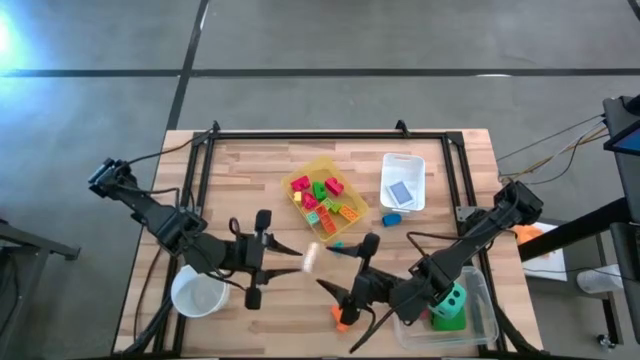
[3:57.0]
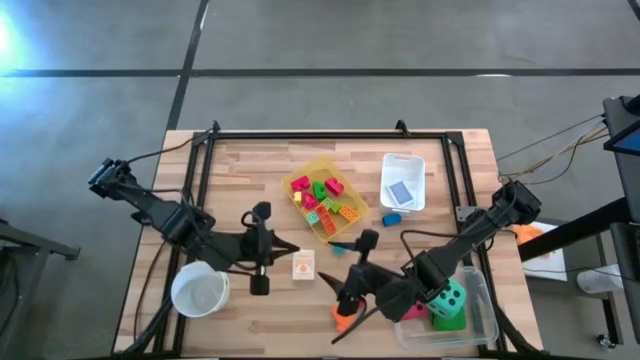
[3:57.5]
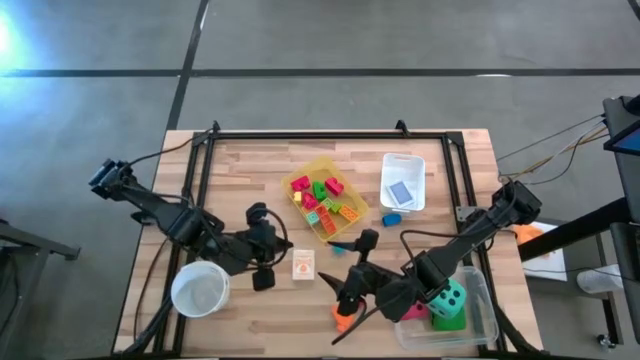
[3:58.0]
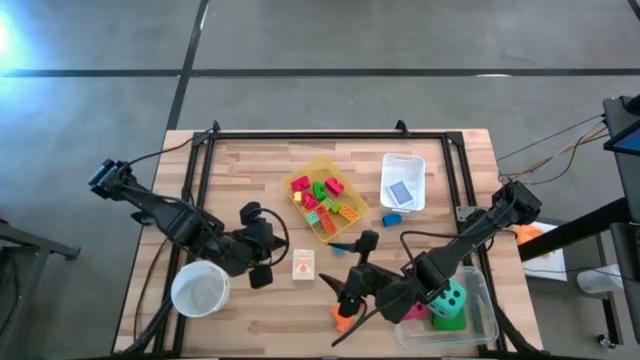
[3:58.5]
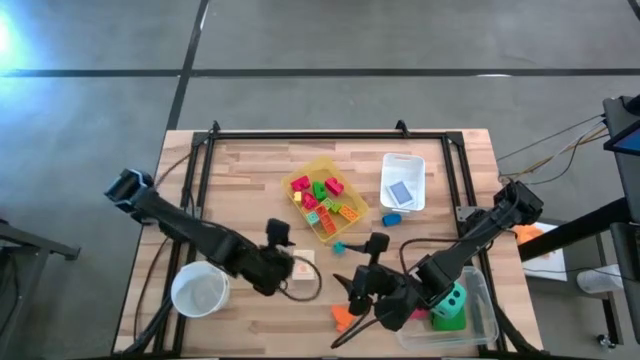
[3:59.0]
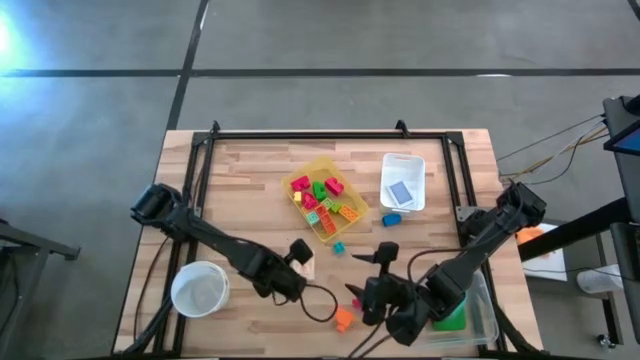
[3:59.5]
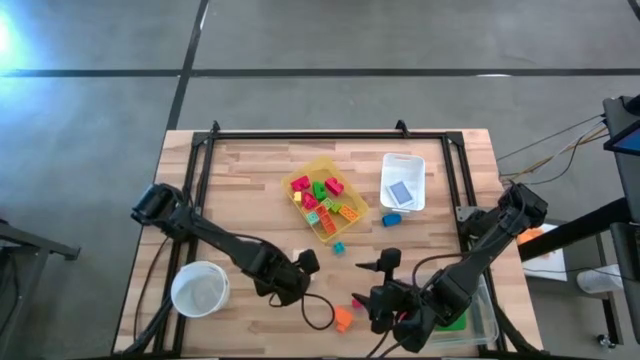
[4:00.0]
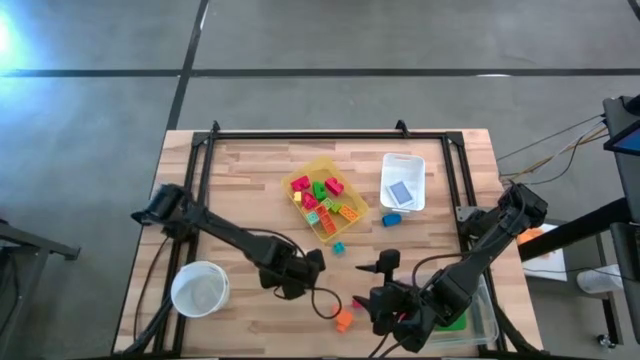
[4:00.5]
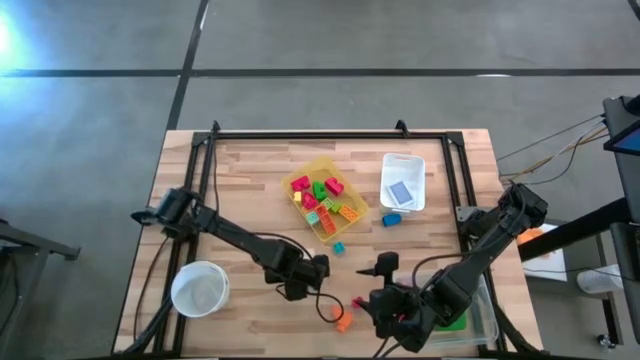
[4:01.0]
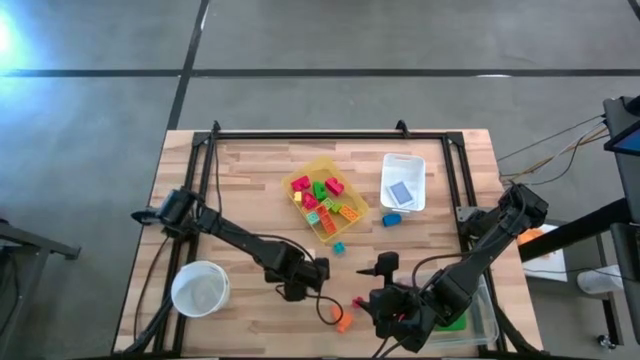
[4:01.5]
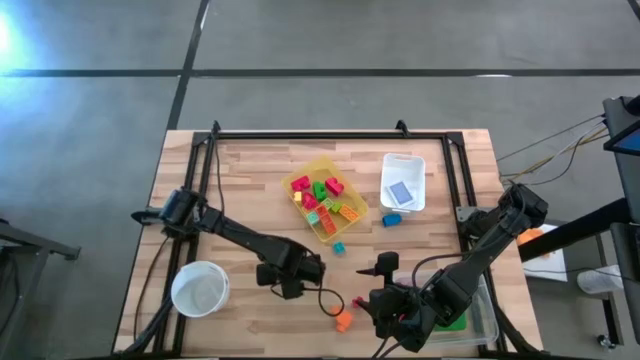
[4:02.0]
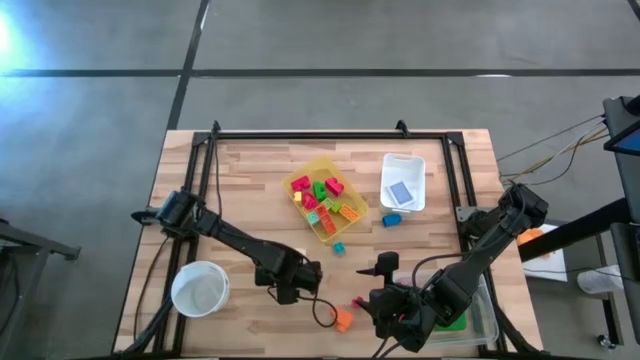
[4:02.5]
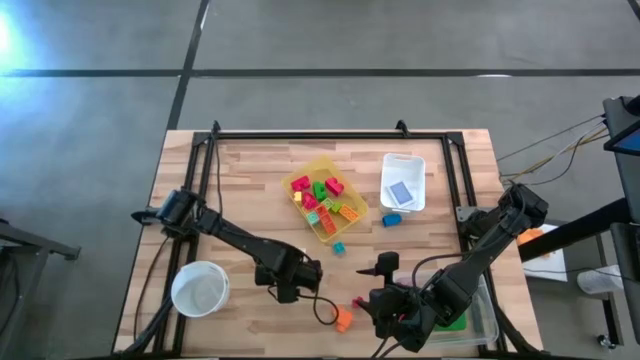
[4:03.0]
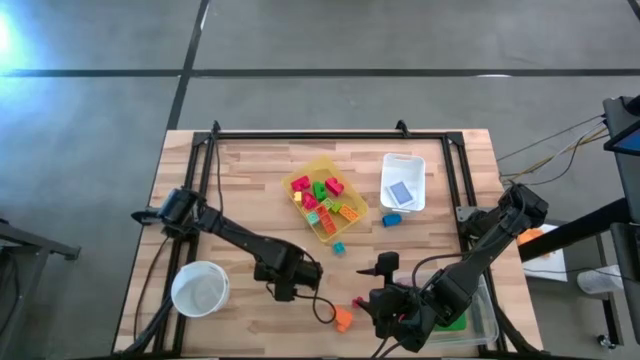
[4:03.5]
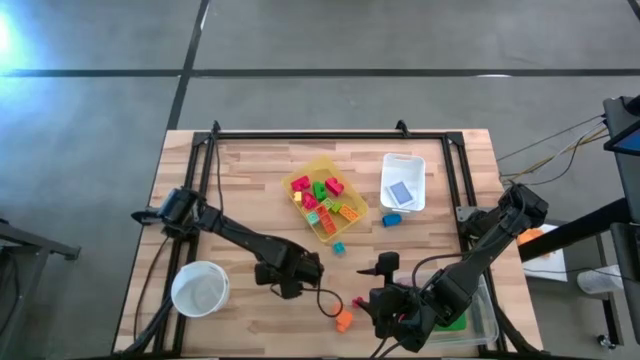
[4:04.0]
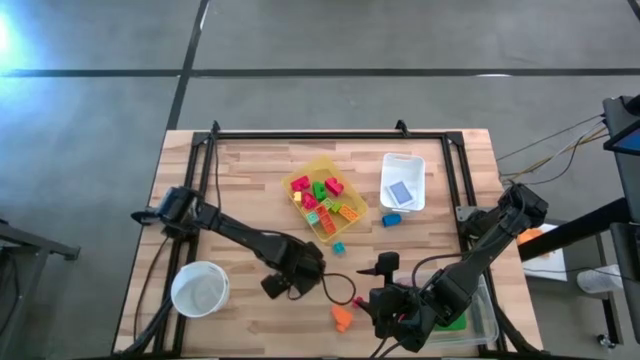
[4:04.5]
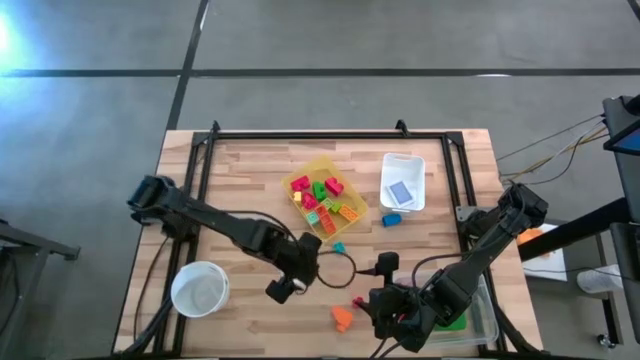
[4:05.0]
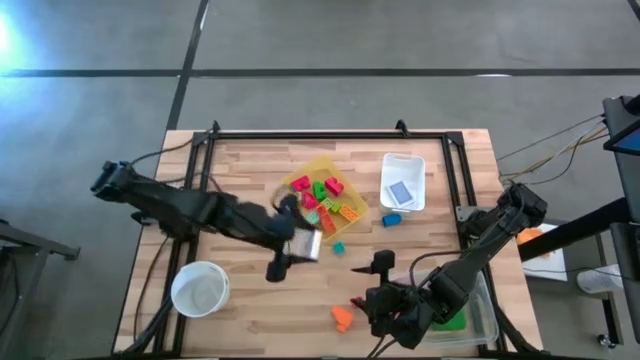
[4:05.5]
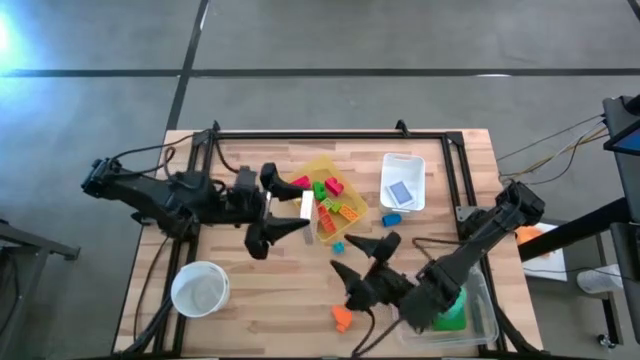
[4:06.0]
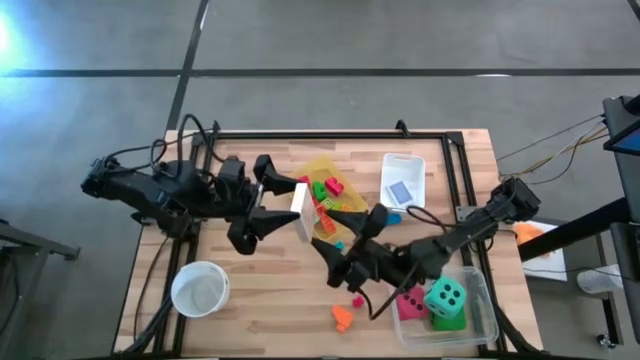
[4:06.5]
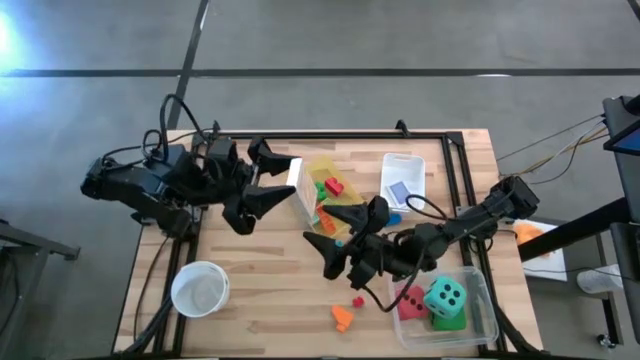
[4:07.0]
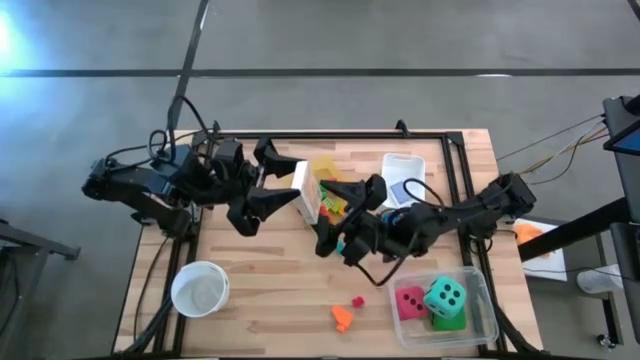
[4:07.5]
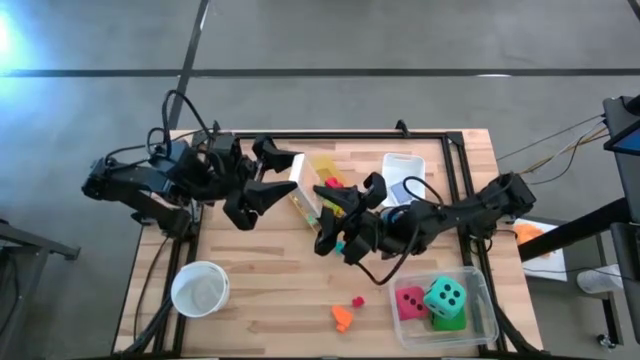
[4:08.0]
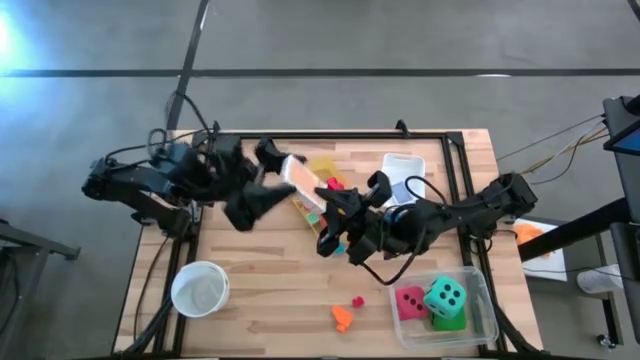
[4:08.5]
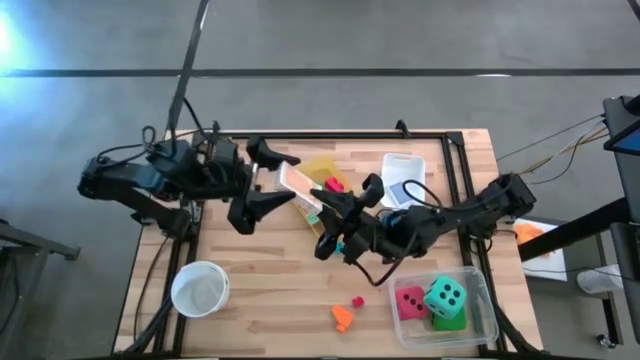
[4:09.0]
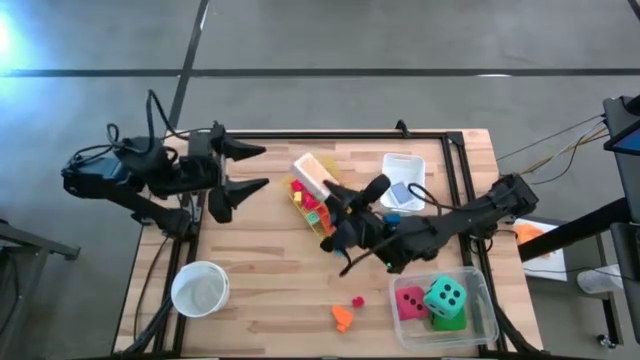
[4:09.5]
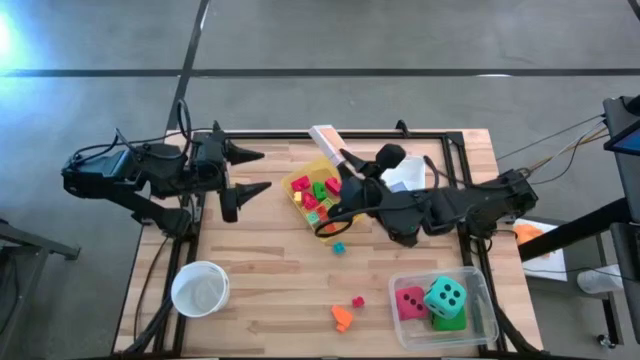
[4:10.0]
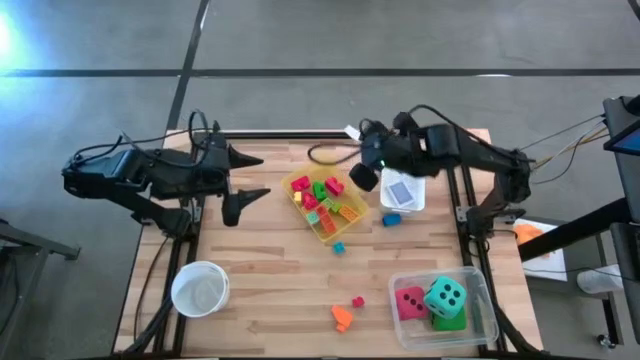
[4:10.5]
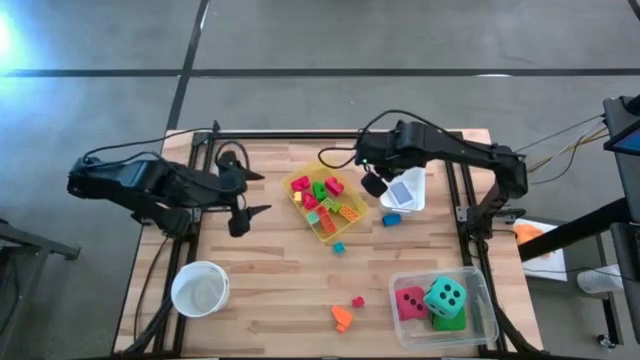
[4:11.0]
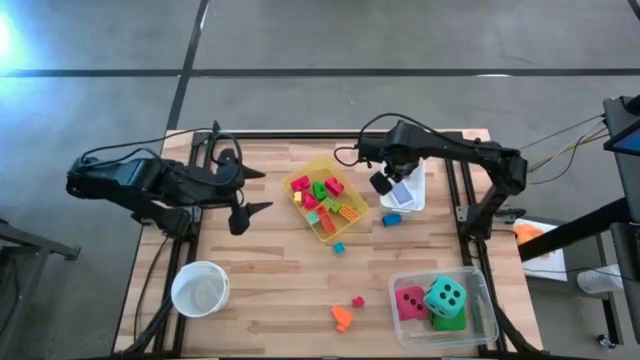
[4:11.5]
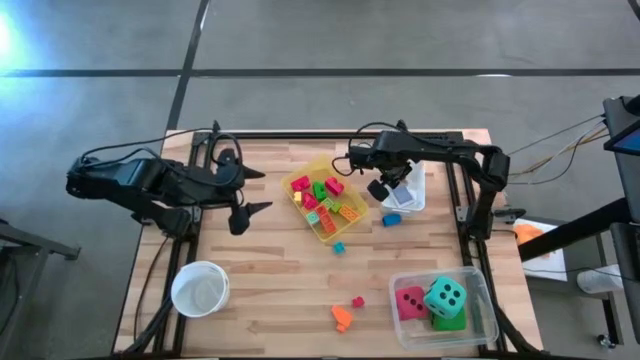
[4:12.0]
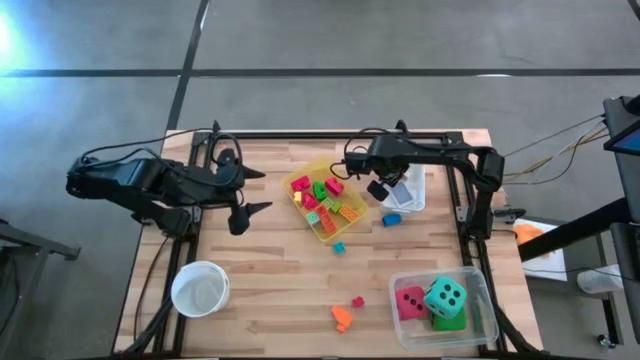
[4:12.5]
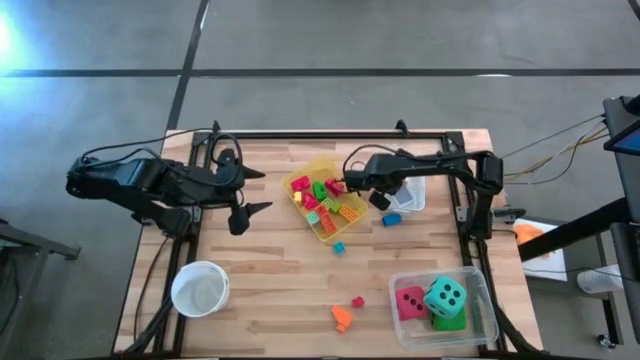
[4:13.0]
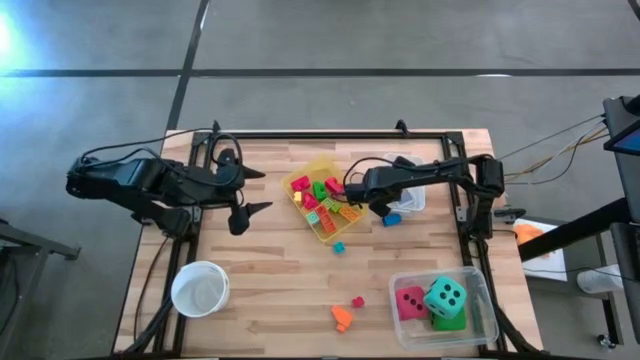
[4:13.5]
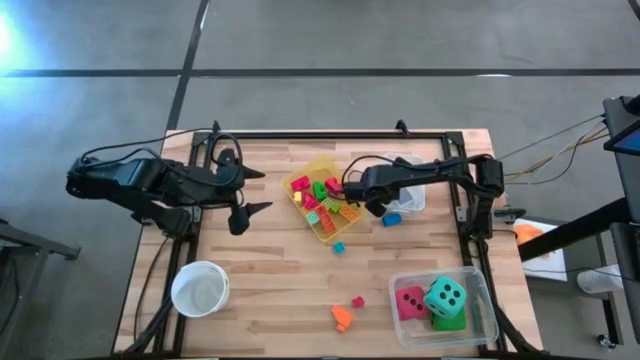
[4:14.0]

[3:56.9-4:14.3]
Task: Pick & Place Toys
Put the yellow deck of cards into the white bin

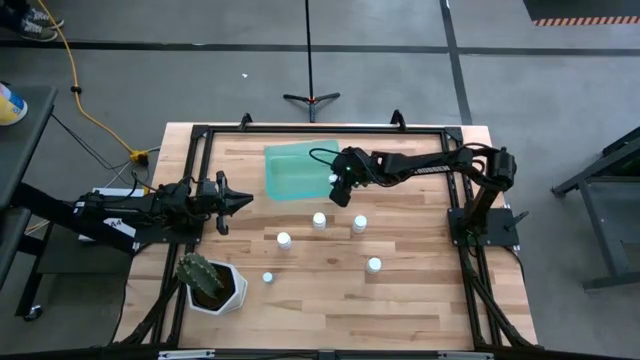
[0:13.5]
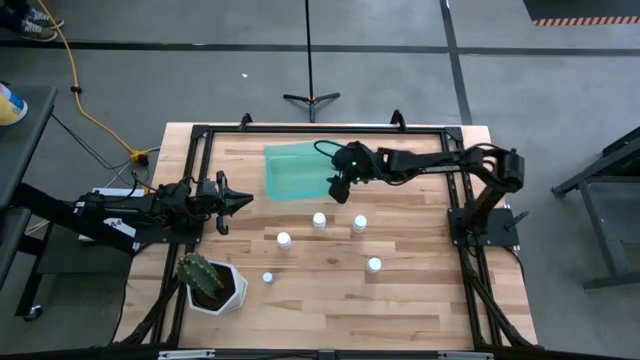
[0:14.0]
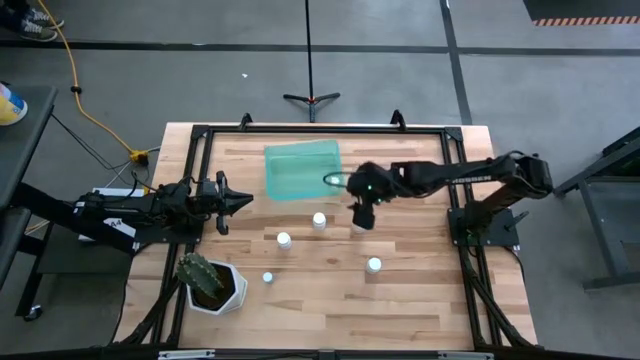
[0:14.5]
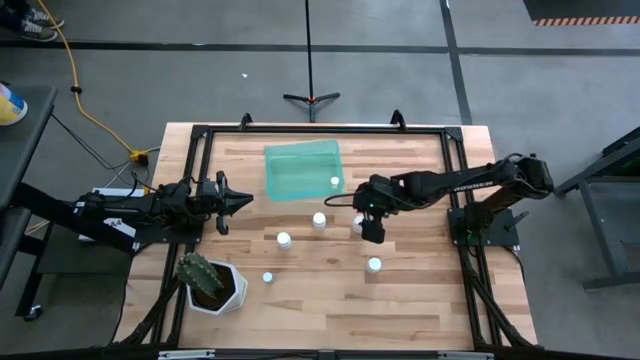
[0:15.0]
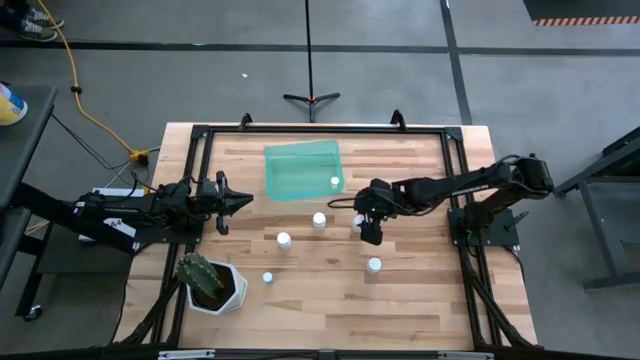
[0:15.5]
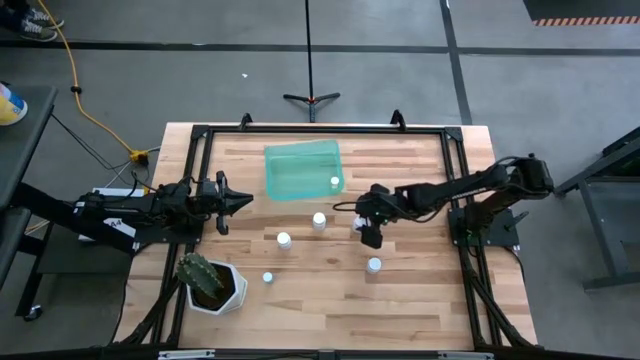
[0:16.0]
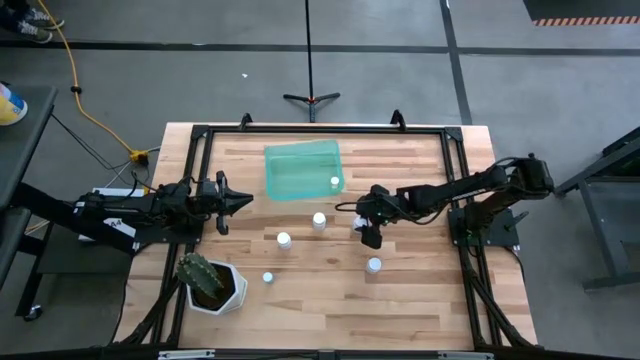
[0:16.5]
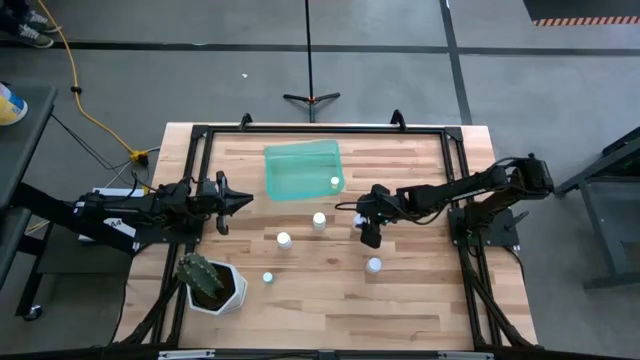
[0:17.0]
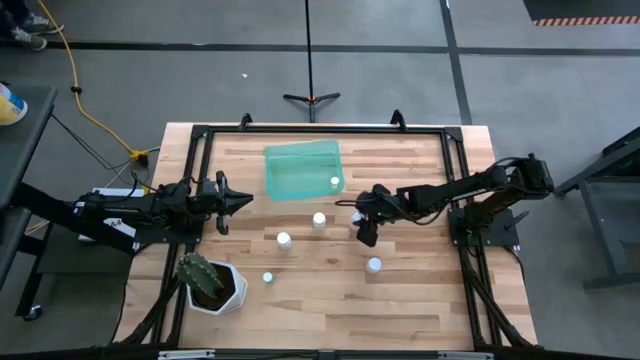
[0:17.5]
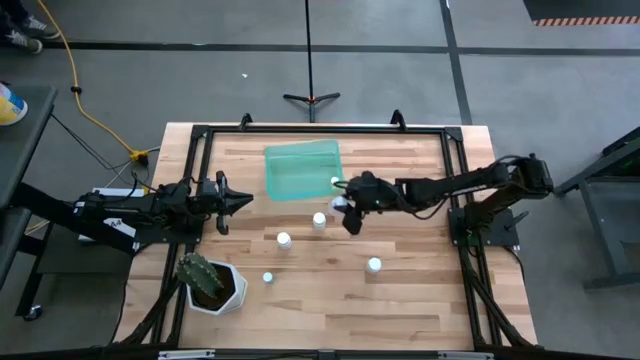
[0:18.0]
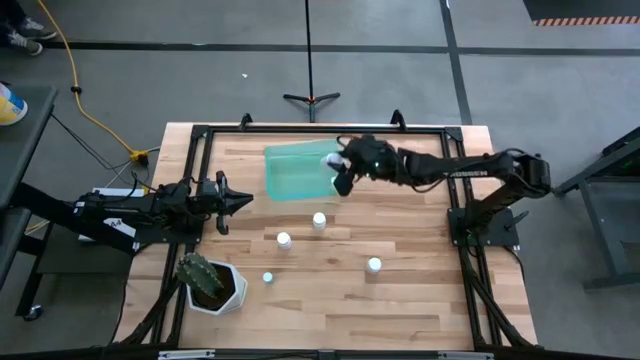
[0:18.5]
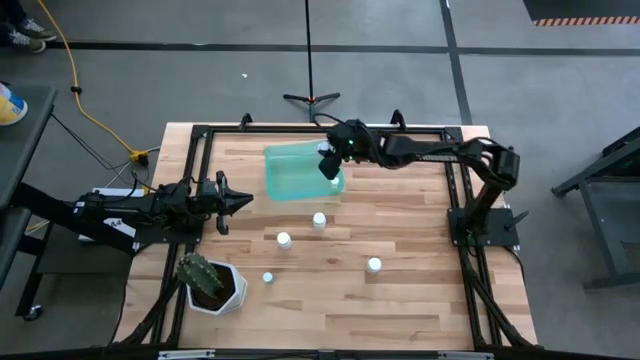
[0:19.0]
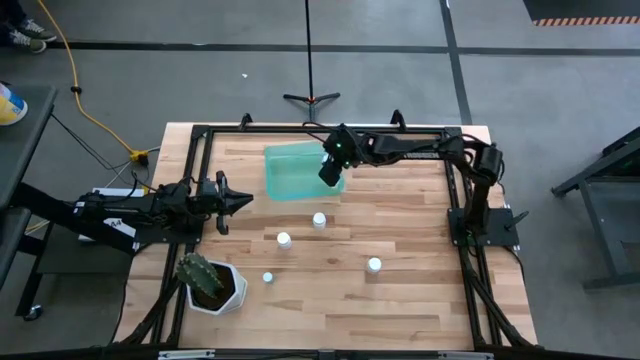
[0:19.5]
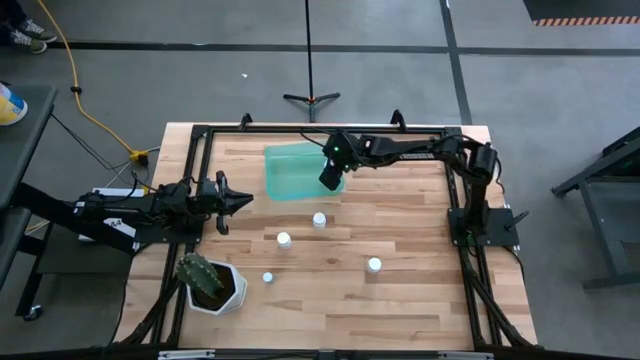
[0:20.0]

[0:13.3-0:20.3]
Task: Pick and place pill bottles into a basket
Put the white pill bottle into the green bin
